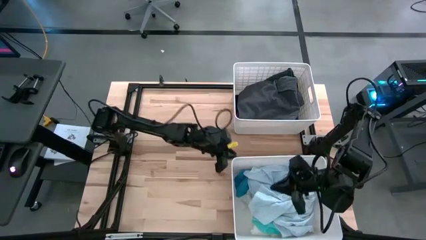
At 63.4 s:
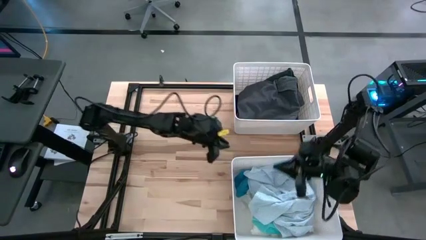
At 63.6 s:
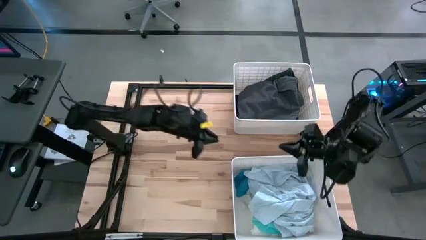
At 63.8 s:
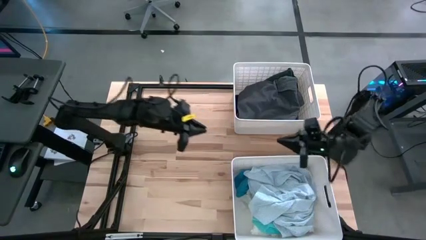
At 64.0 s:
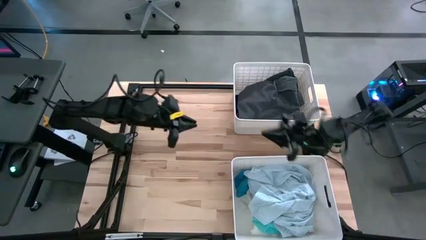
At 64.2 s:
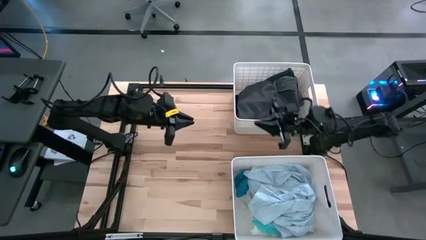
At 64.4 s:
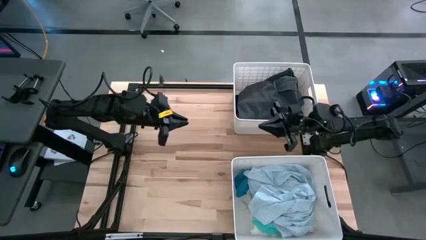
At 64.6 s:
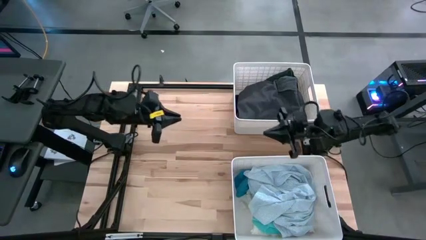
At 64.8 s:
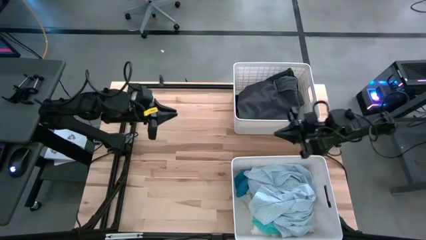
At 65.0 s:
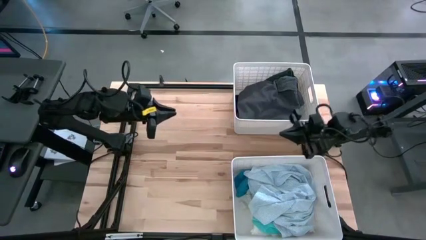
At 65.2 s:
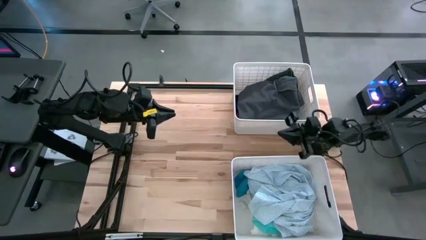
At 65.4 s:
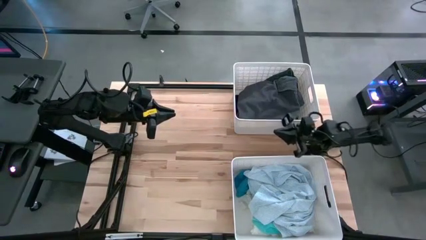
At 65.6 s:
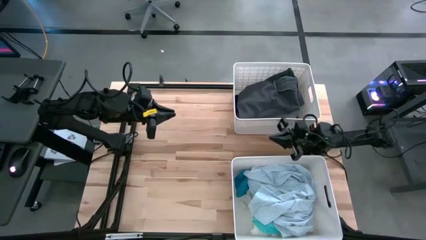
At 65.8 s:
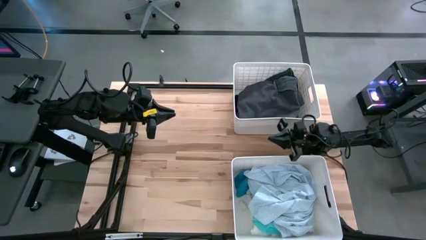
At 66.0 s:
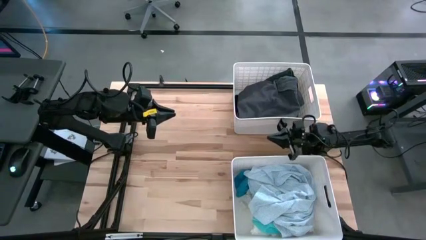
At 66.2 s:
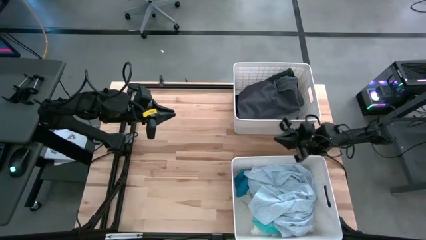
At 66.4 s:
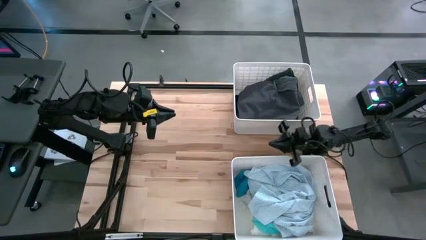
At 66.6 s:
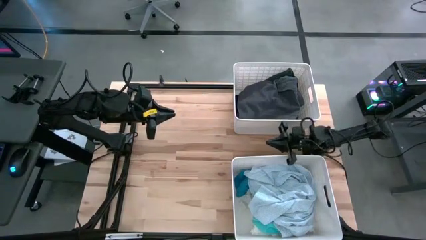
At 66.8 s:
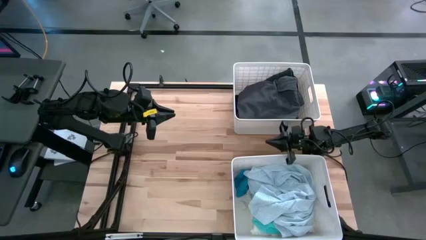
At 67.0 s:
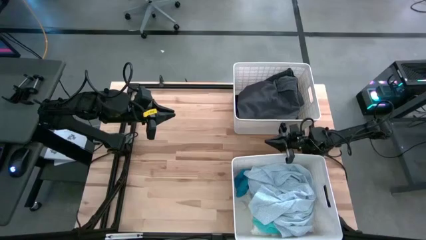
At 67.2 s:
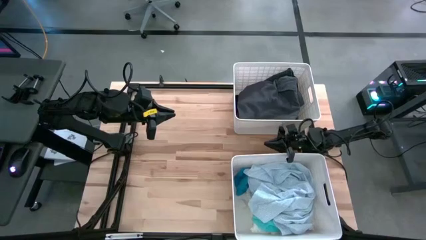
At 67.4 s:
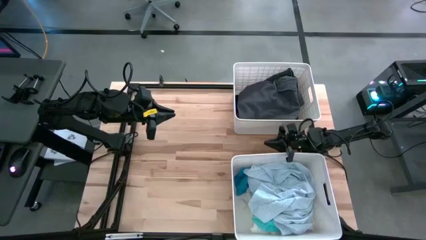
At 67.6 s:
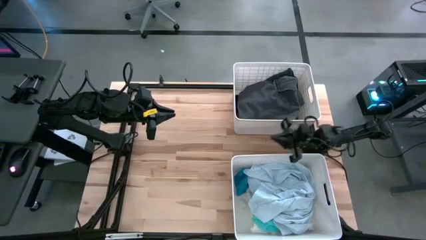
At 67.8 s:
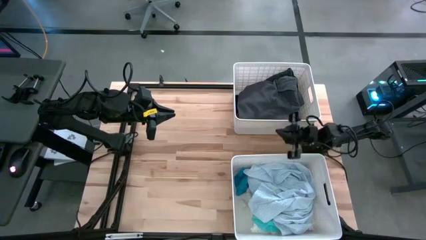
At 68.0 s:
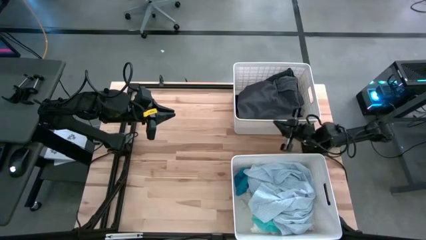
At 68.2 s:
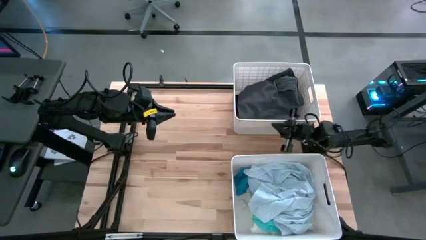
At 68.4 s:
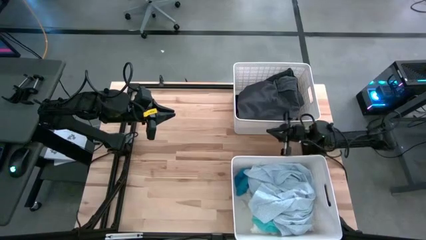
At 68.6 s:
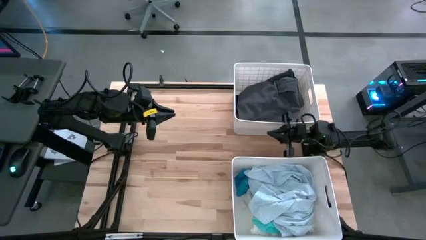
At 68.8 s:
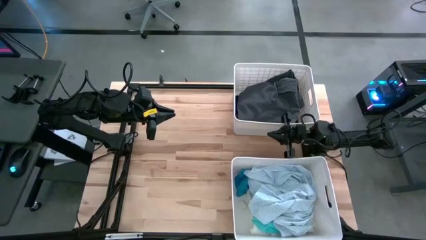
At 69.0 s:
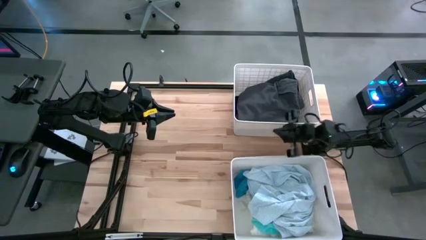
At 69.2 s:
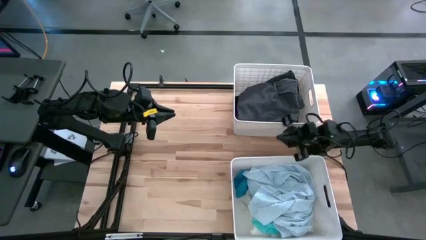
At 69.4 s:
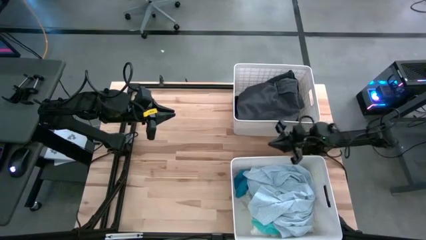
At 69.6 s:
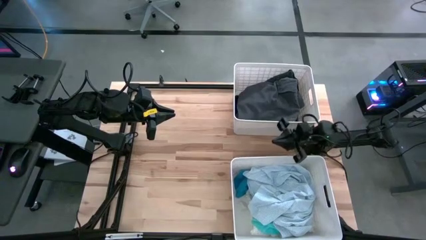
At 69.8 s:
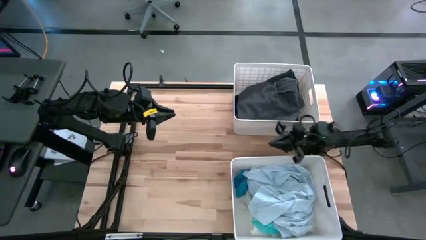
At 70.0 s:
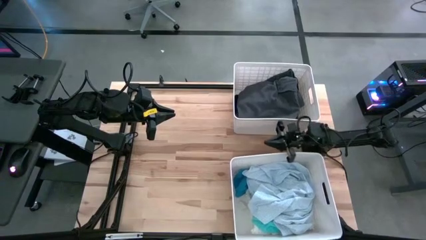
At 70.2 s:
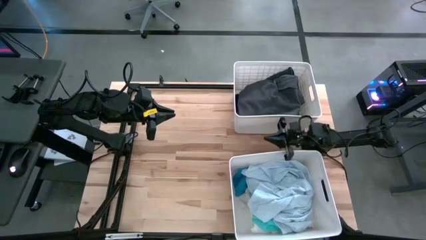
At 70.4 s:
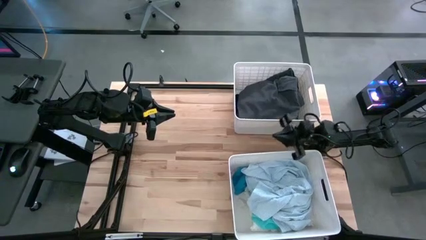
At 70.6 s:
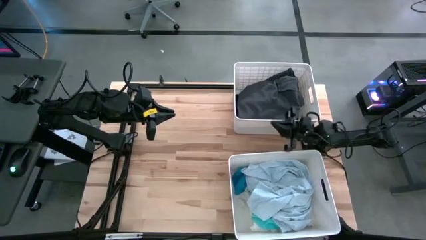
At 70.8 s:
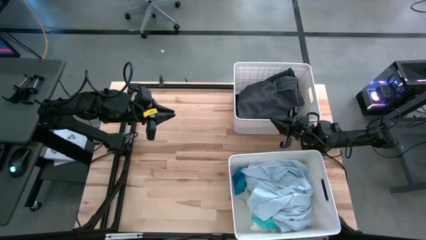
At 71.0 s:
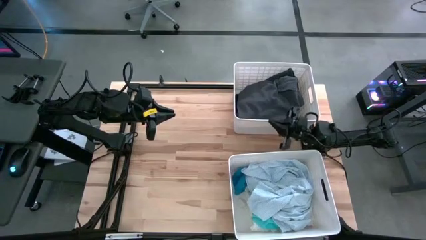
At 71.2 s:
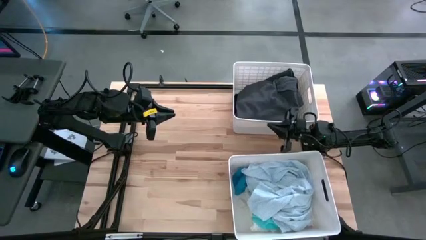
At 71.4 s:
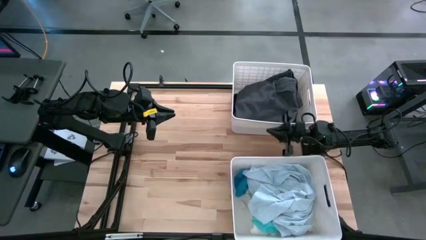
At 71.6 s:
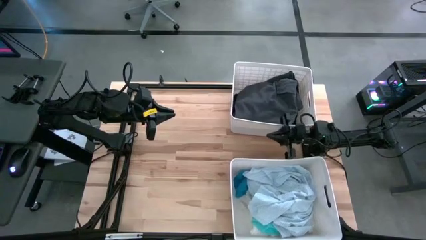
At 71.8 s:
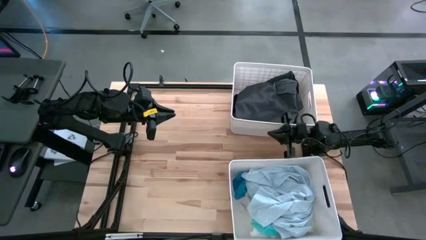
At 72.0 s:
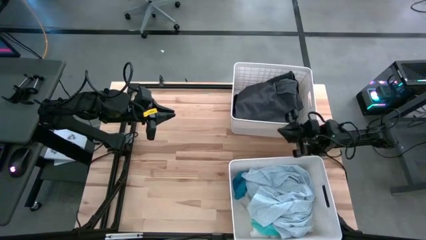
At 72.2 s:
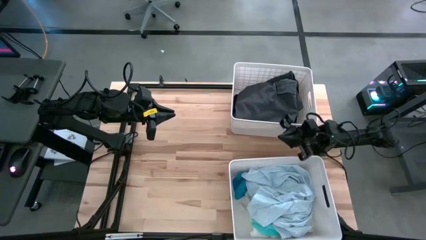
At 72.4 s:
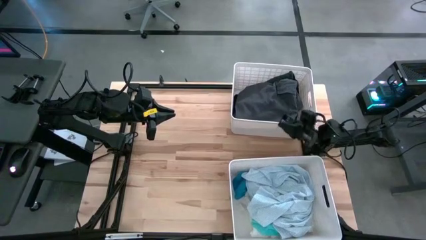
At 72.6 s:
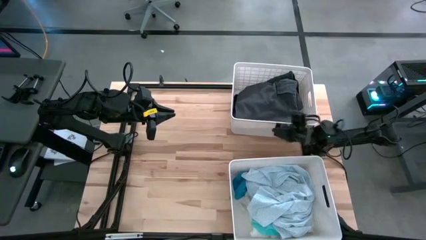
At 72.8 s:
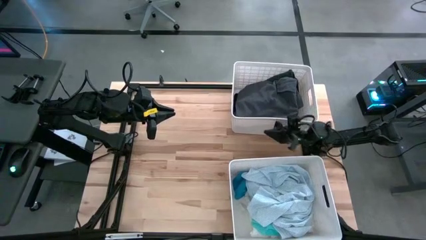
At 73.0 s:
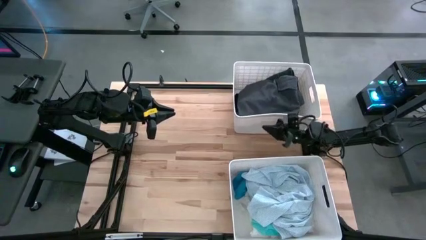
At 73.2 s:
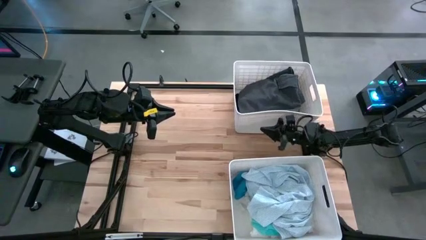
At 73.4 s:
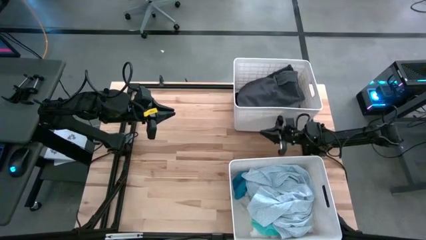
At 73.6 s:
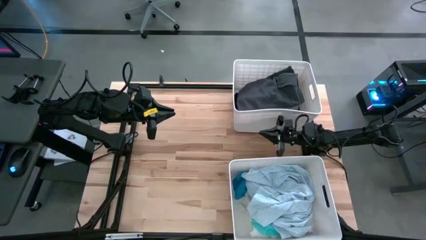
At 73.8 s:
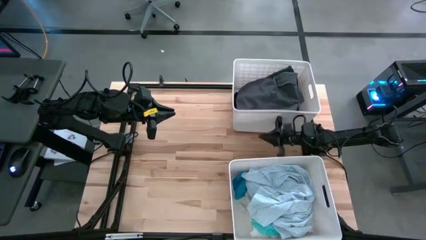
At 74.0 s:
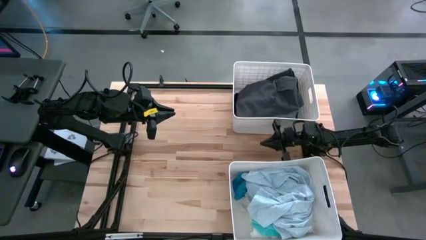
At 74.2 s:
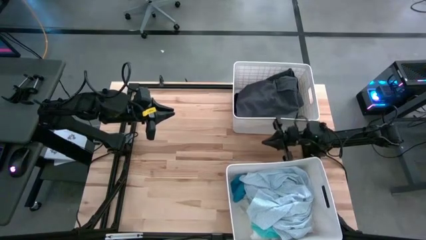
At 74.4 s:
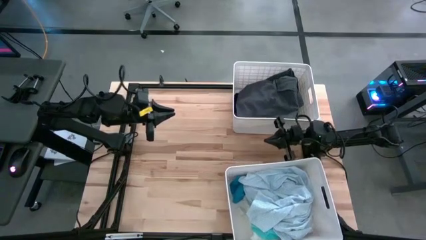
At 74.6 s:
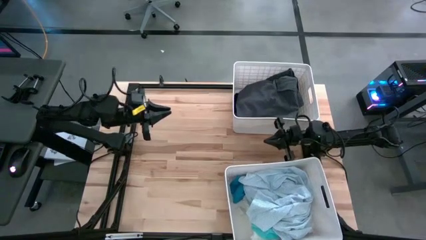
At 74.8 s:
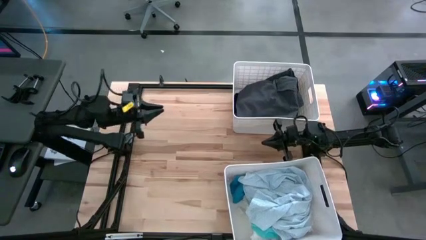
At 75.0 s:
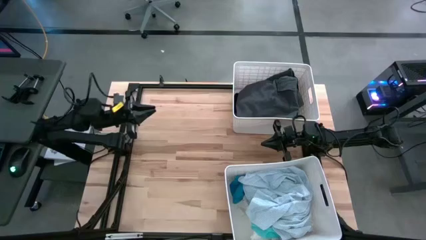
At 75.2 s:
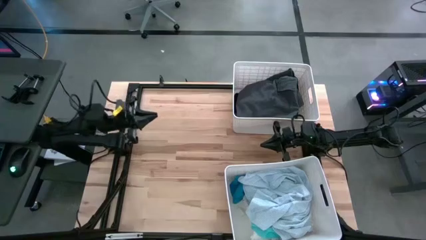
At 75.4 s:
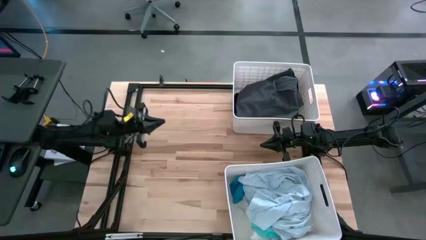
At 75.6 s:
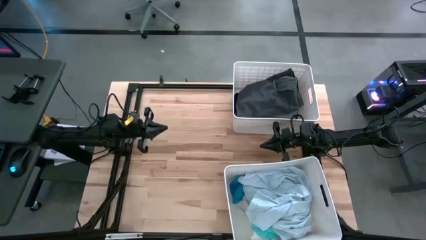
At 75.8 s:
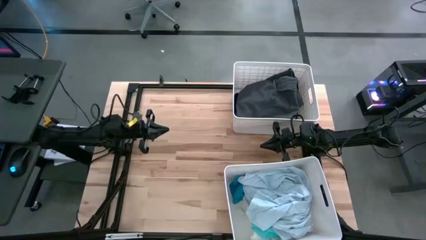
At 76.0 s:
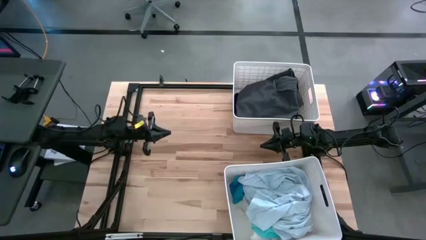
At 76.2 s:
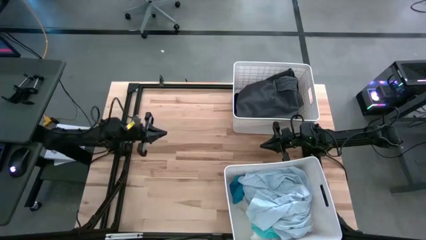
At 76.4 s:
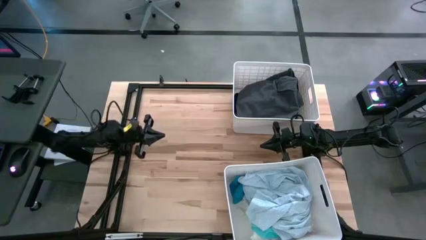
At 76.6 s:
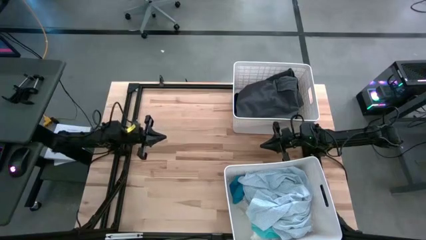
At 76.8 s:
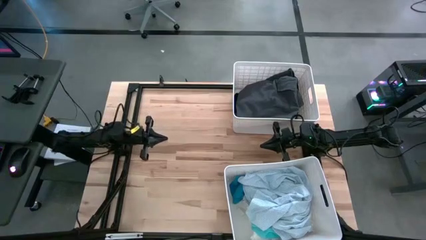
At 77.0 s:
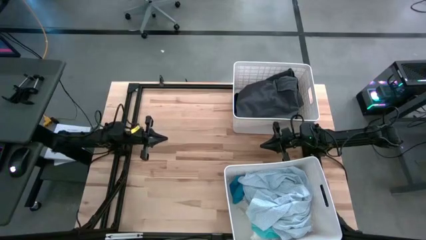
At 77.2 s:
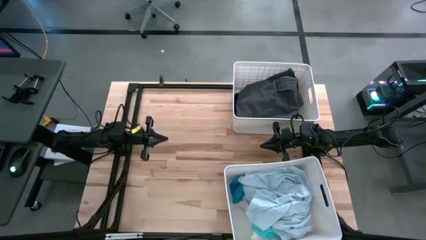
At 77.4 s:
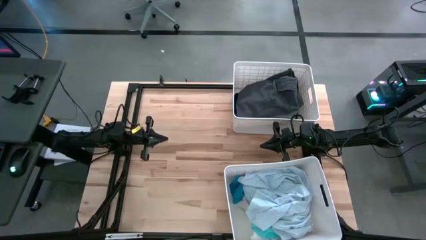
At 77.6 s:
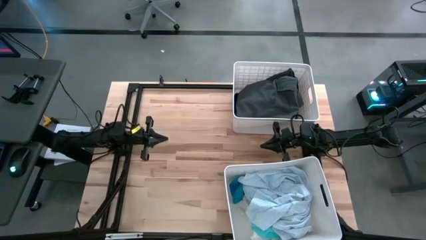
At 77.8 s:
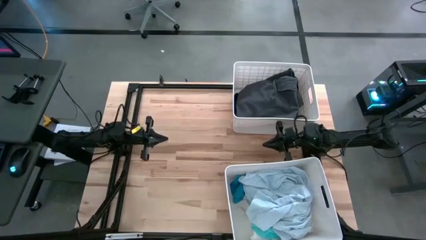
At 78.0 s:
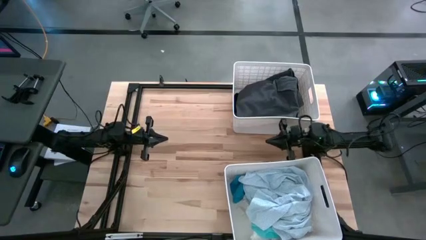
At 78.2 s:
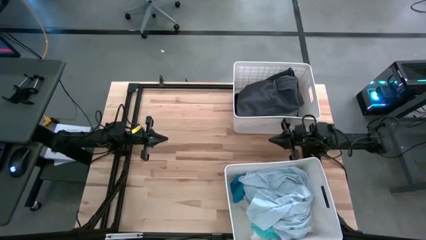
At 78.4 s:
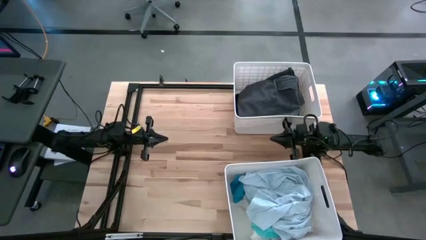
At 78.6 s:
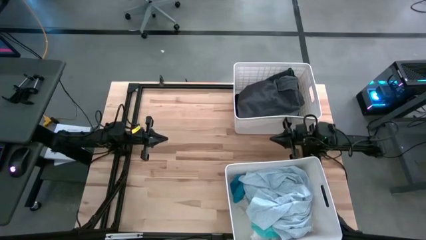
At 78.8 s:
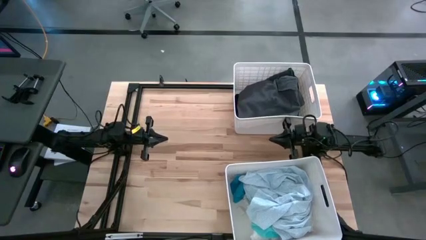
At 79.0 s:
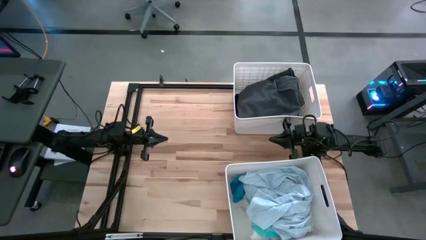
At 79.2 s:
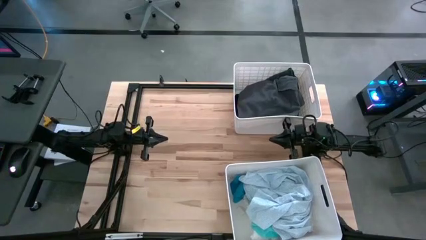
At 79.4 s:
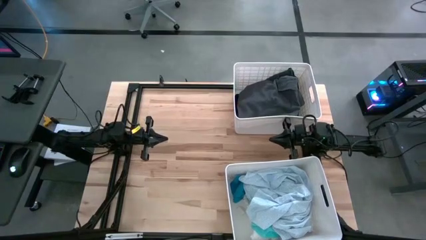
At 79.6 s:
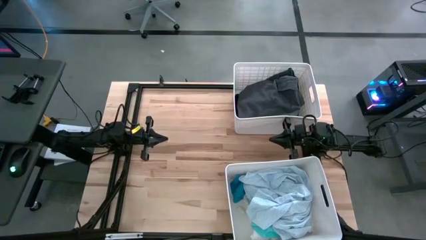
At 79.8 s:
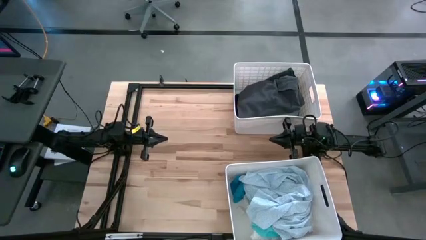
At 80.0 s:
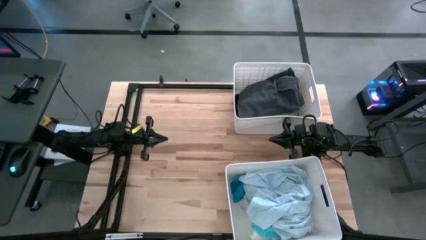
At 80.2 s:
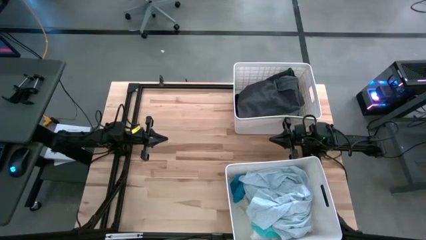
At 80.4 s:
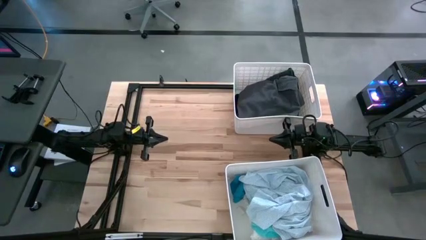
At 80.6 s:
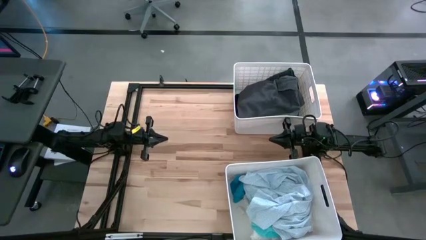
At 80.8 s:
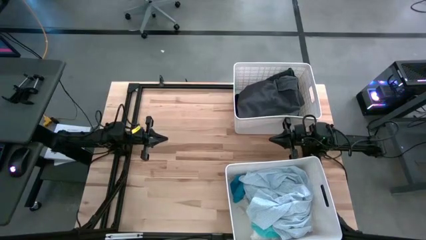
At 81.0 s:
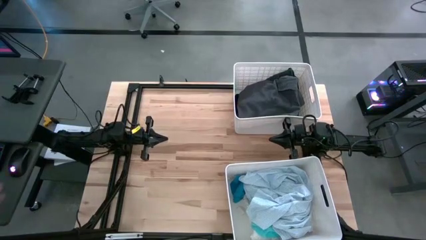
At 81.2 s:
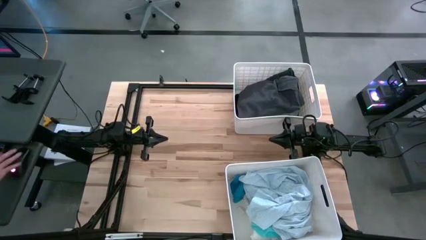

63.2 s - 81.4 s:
Task: Sort clothes
Return to Home Position
